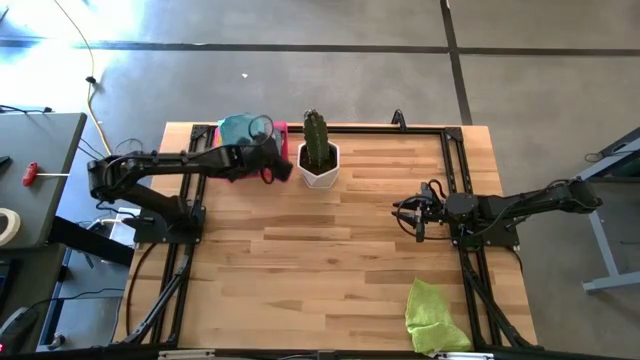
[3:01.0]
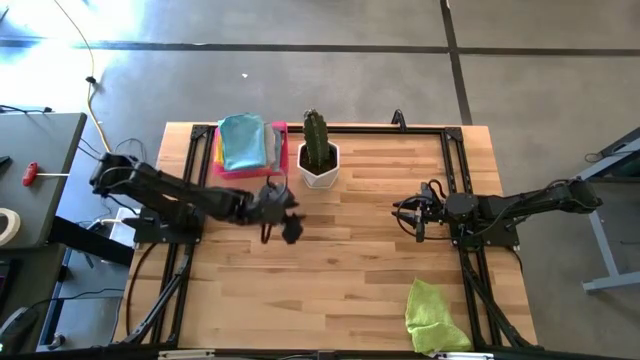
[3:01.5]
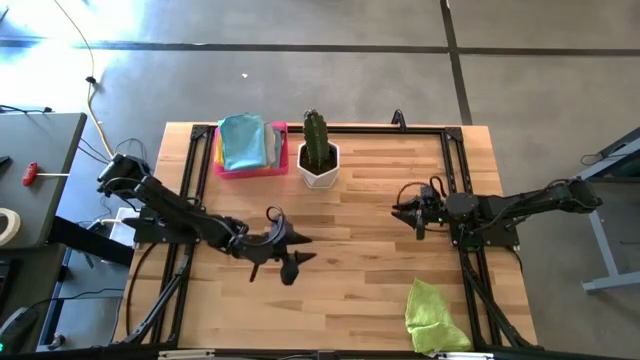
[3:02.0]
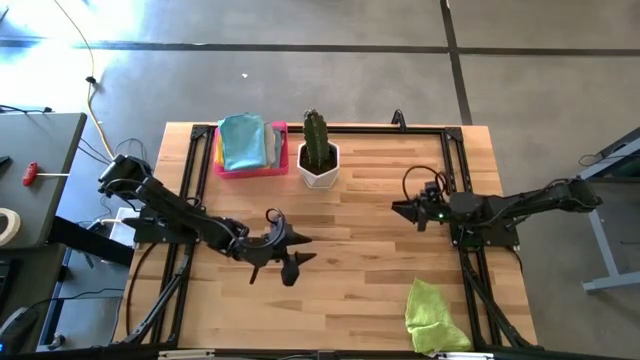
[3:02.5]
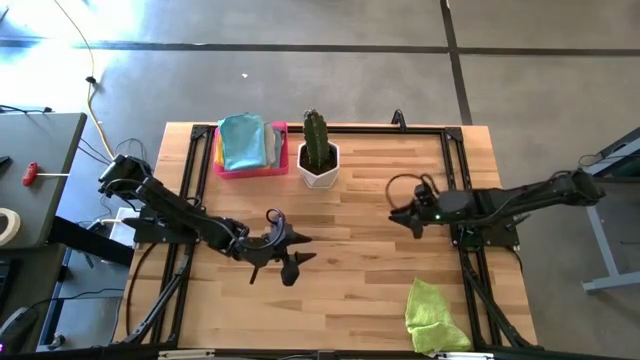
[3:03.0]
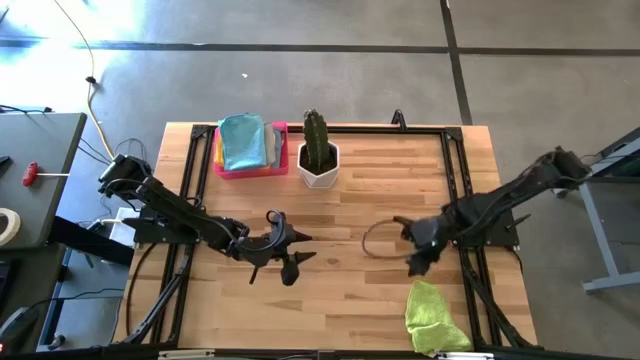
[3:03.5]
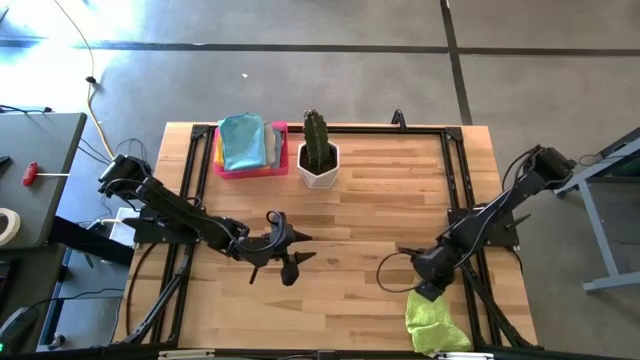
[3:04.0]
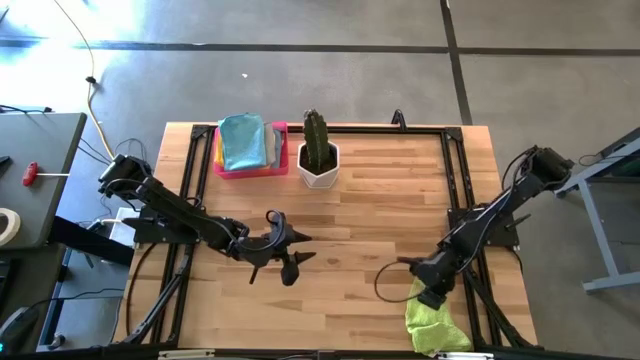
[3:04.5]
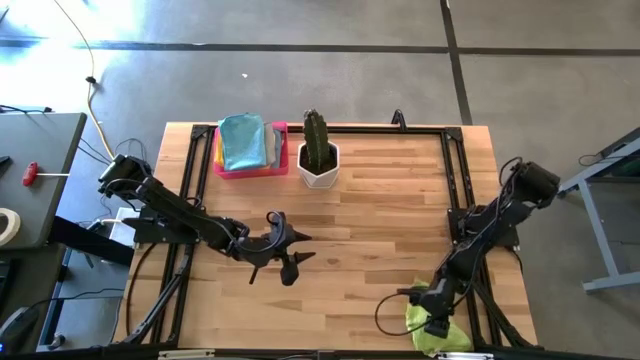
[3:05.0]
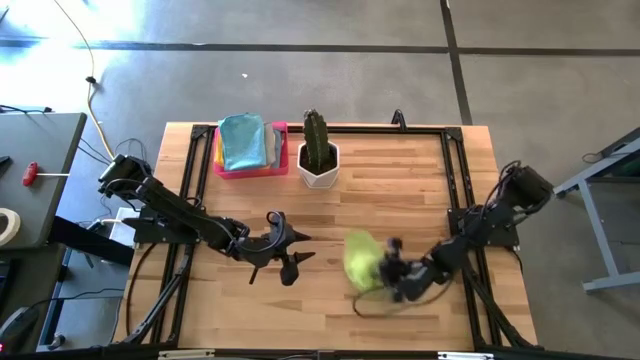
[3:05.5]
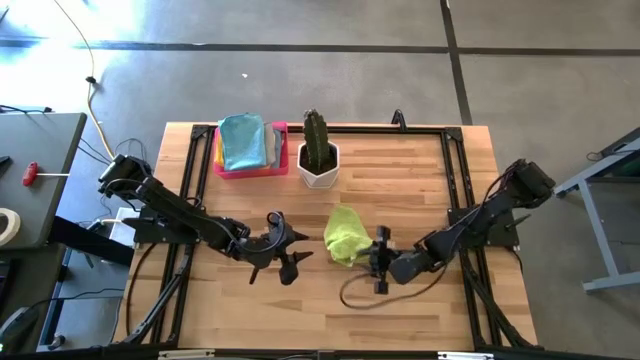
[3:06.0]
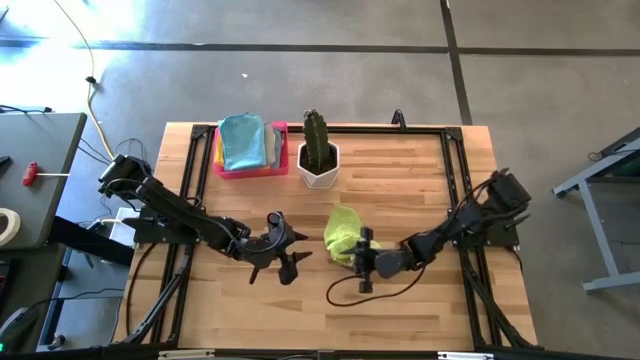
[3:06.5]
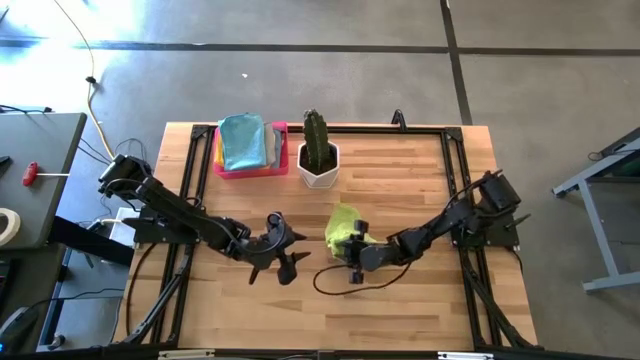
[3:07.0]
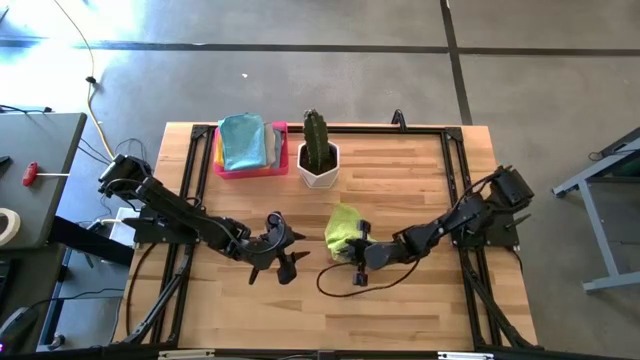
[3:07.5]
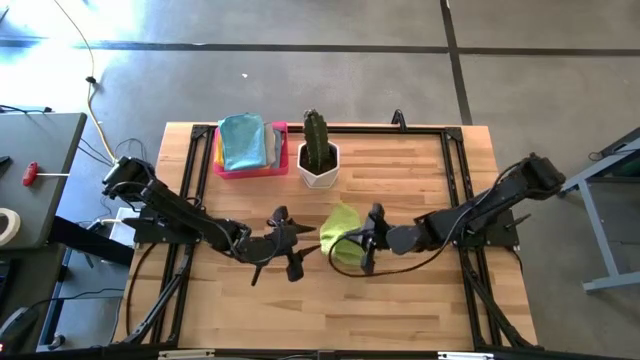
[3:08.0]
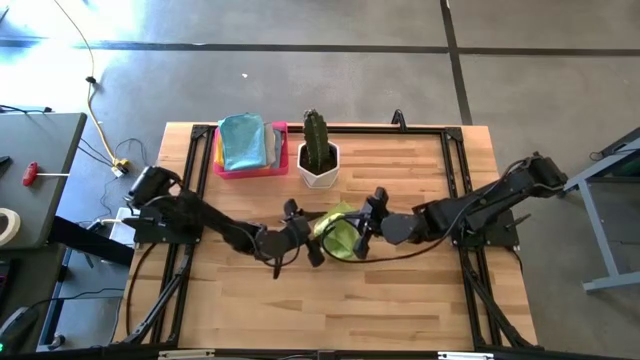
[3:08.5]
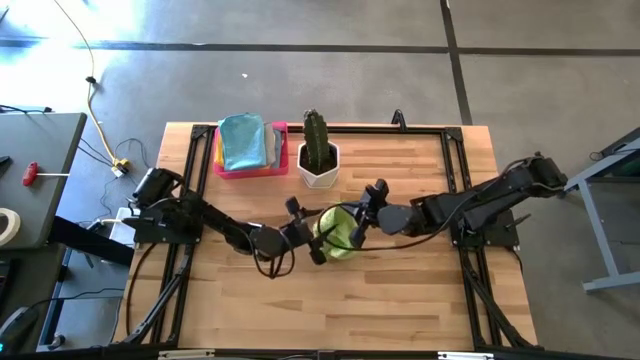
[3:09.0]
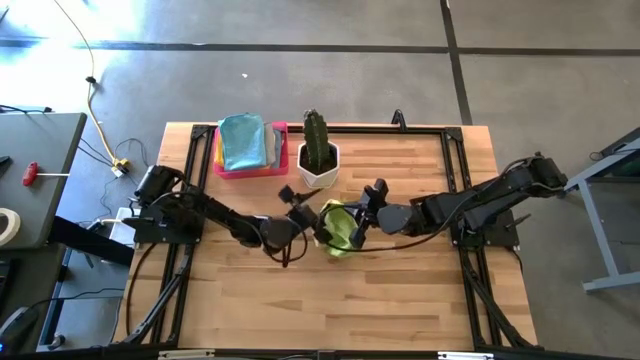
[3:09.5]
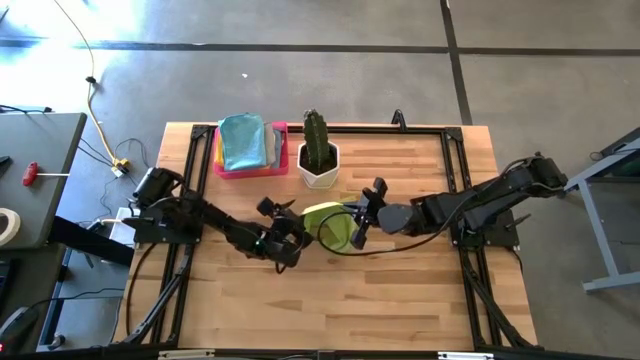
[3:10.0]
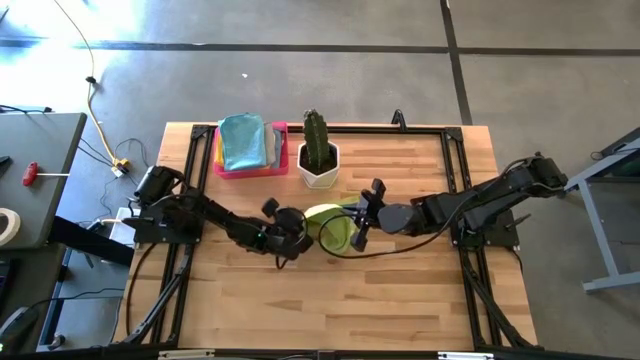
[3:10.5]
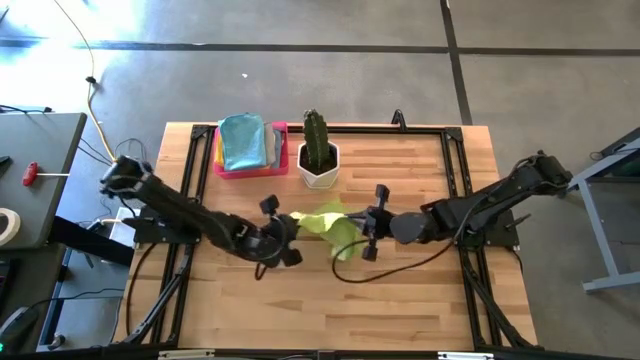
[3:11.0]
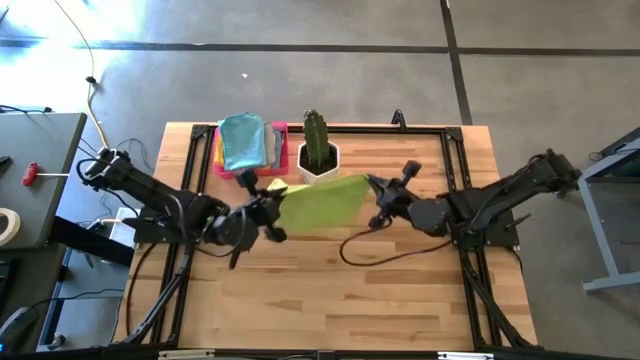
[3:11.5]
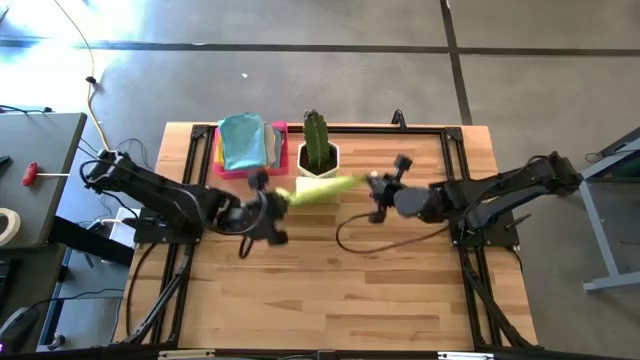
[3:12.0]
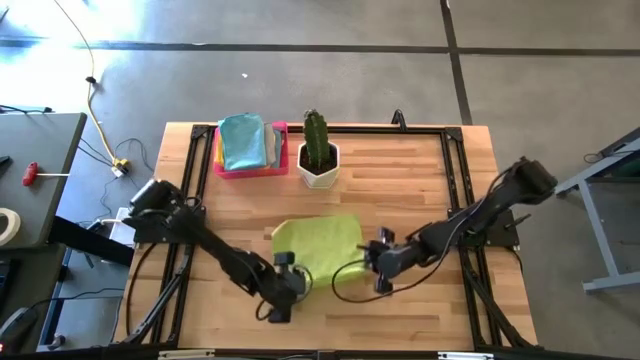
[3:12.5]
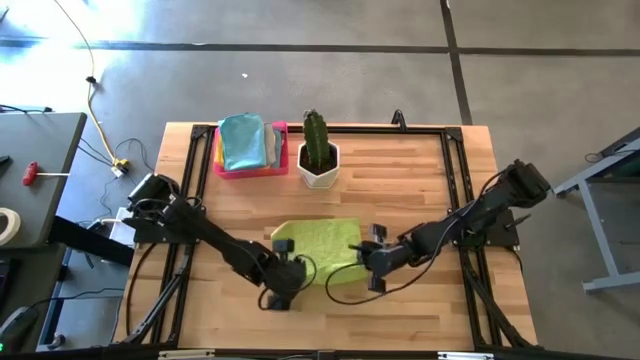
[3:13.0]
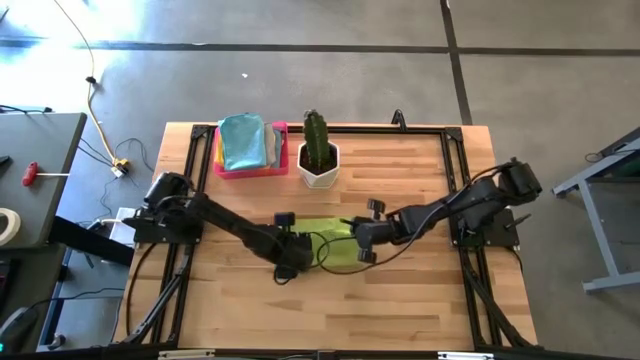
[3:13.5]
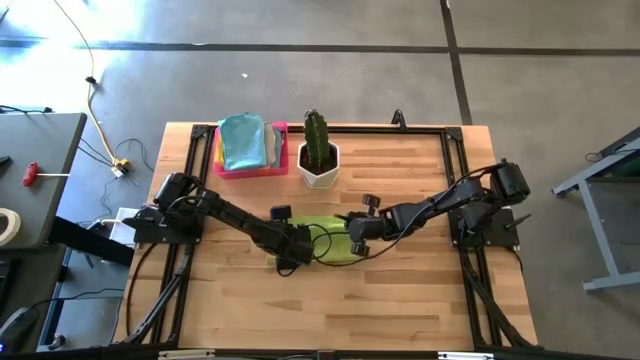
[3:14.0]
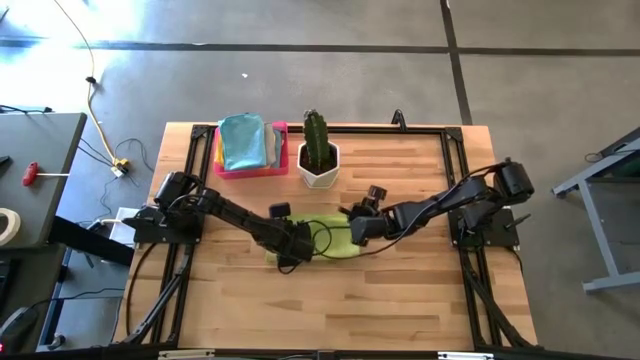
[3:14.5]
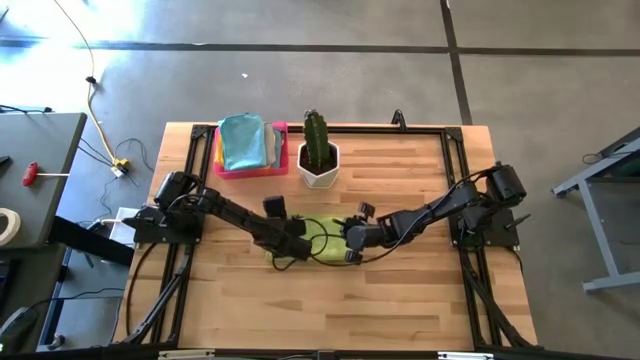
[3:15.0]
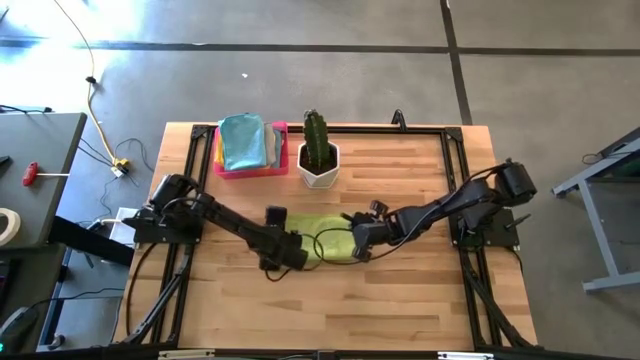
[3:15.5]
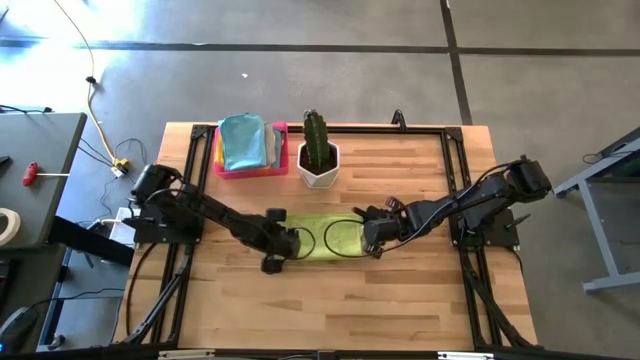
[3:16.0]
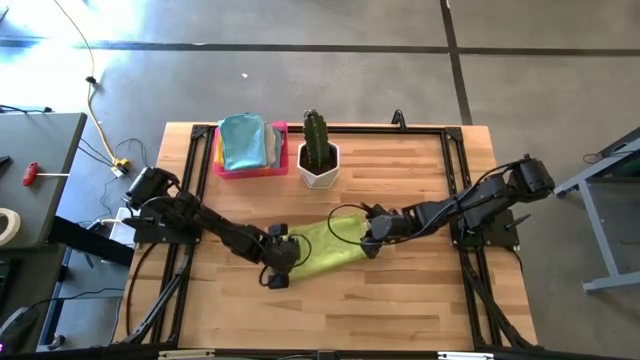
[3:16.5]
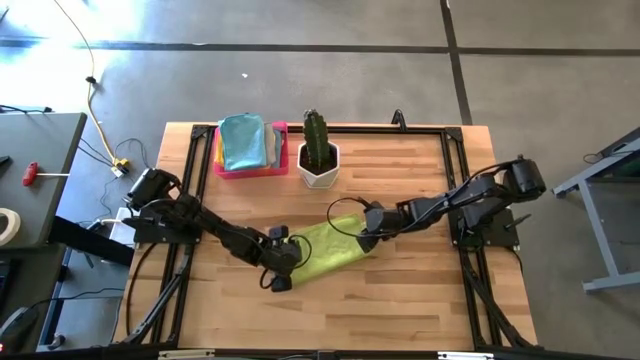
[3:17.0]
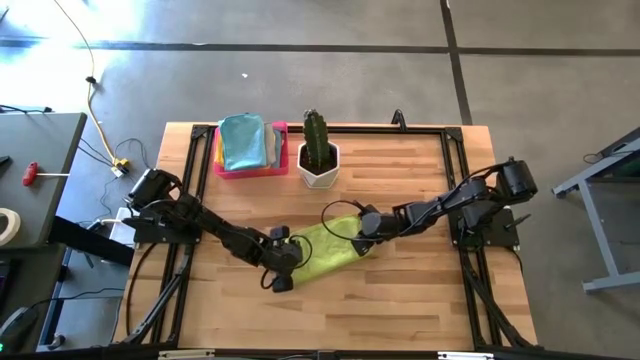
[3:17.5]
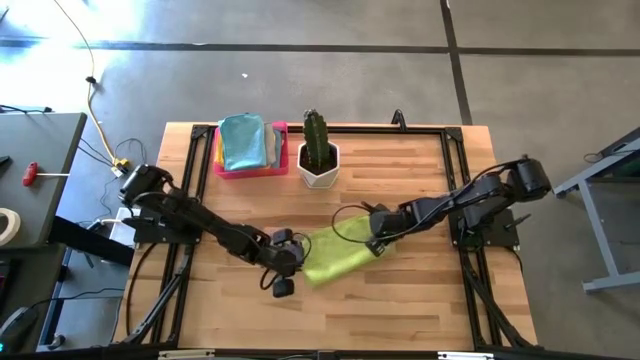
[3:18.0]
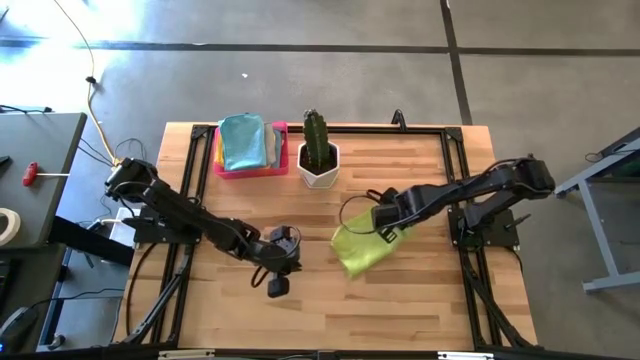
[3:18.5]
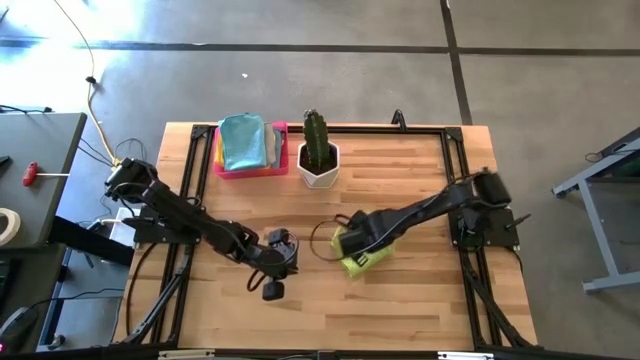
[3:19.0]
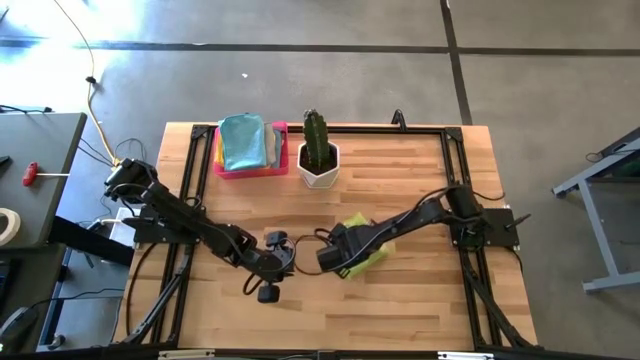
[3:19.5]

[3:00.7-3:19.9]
Task: Fold microfiber towels
Fold the green microfiber towel

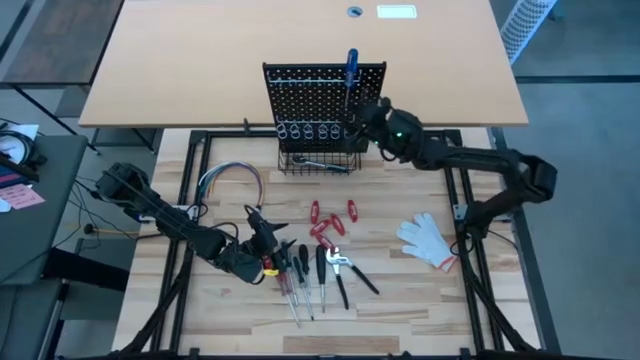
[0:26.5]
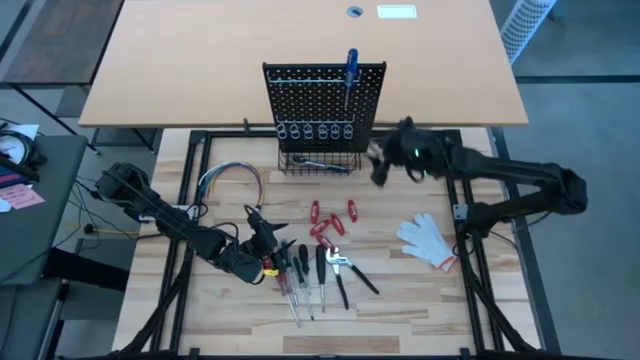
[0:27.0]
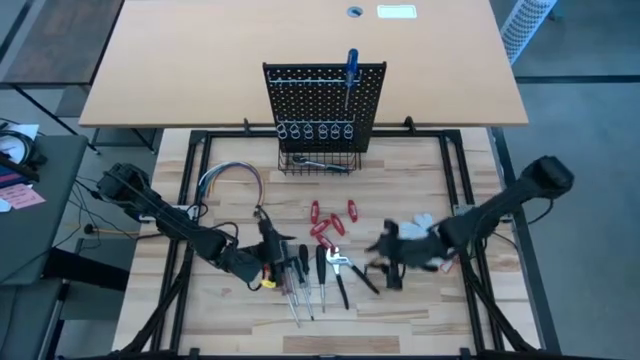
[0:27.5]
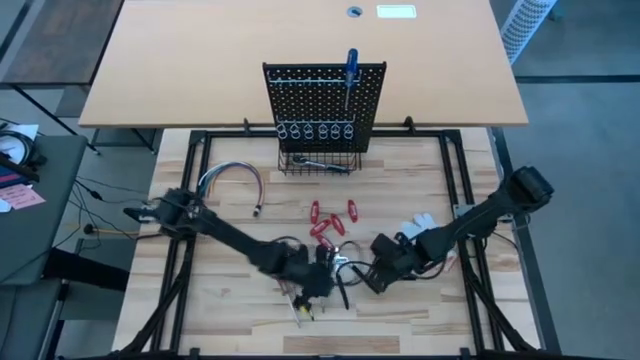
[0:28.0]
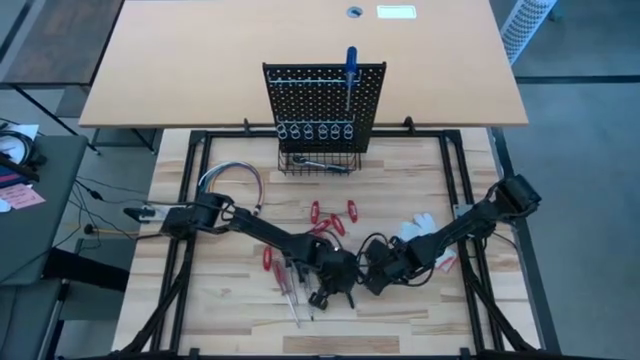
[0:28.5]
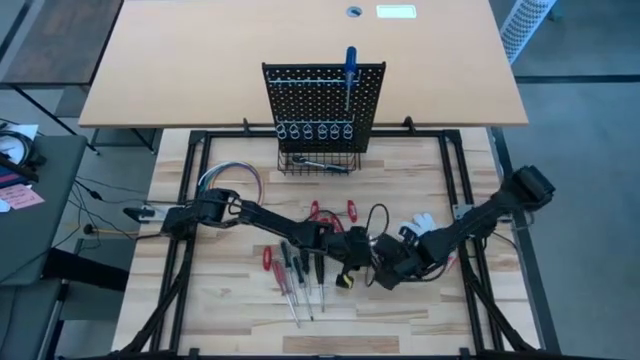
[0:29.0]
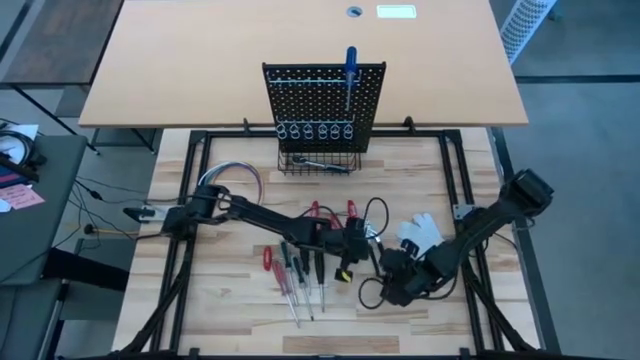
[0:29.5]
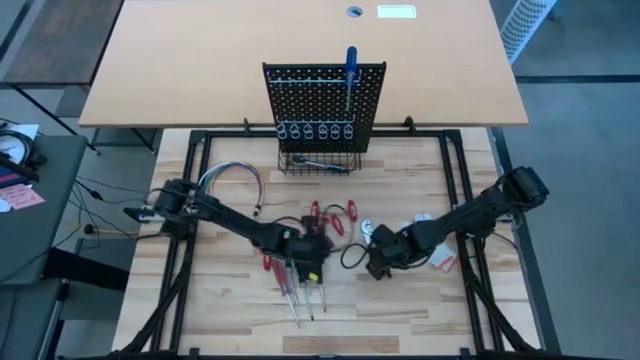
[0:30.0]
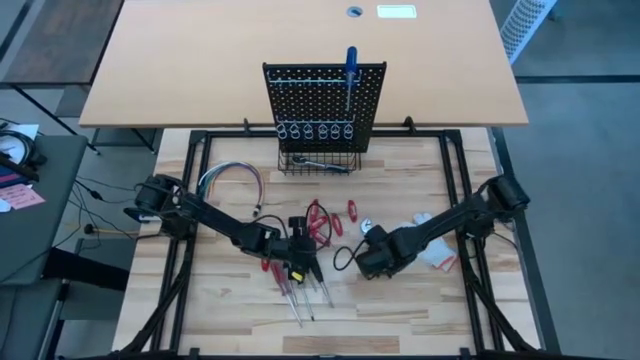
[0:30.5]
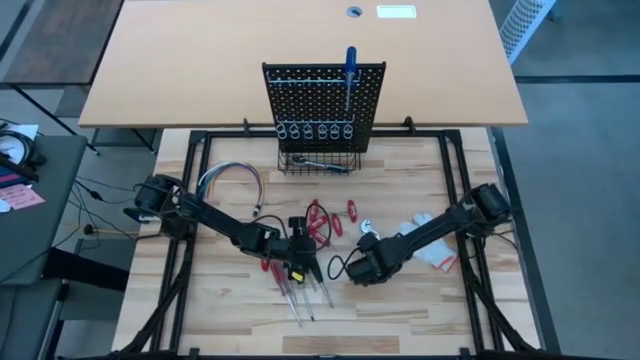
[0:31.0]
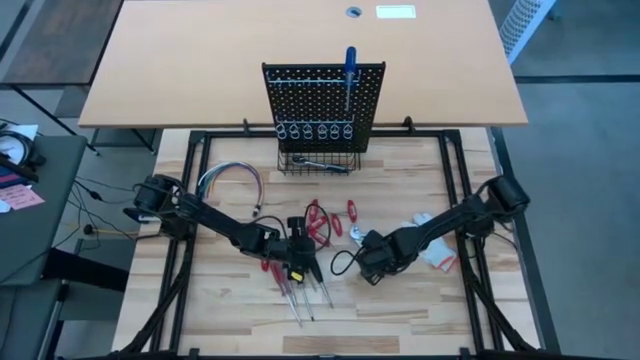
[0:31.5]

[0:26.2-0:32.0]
Task: Hang tools onto peg board
Put the slip-joint pliers into the black wire on the pegboard
